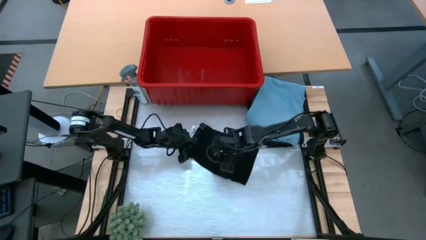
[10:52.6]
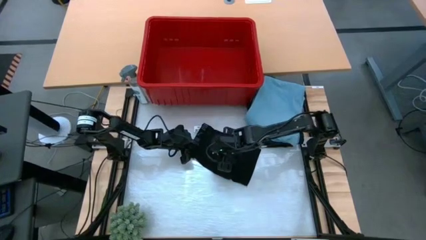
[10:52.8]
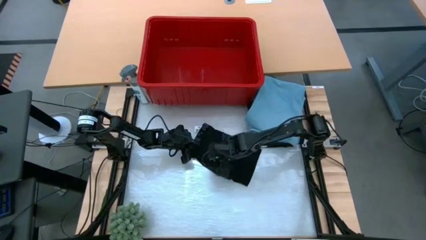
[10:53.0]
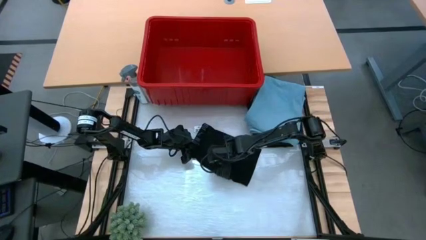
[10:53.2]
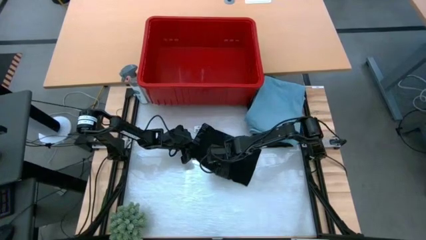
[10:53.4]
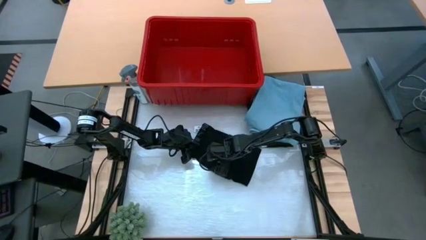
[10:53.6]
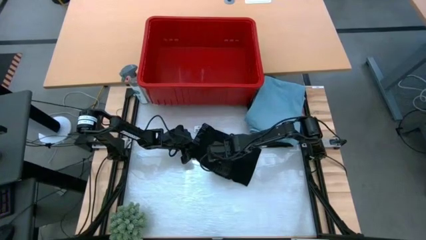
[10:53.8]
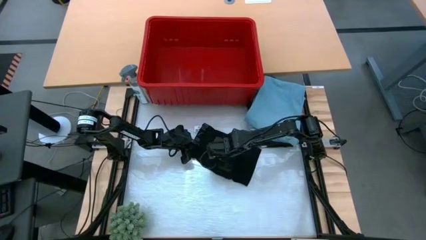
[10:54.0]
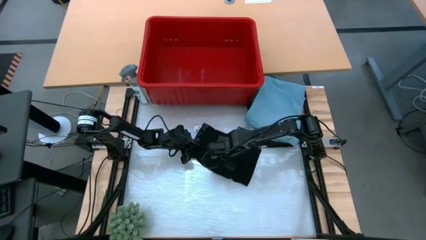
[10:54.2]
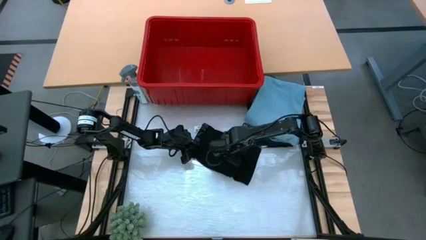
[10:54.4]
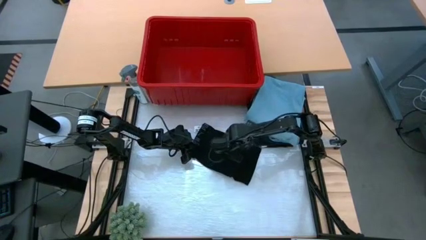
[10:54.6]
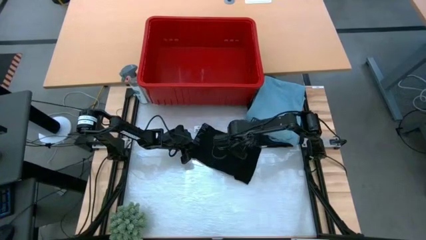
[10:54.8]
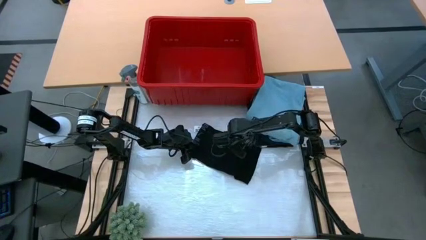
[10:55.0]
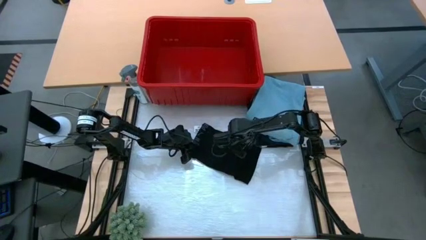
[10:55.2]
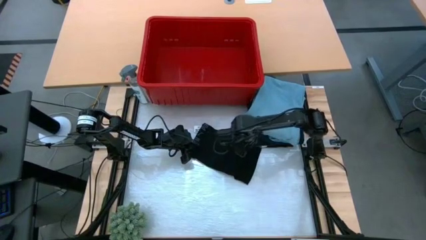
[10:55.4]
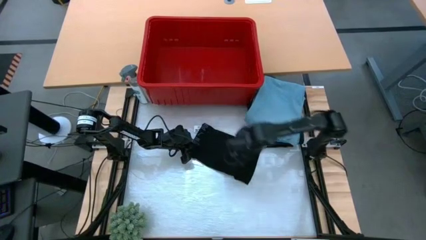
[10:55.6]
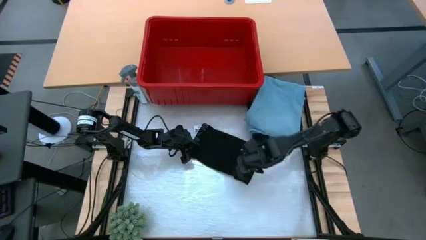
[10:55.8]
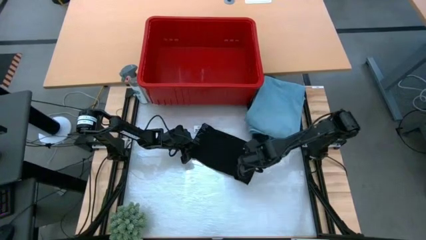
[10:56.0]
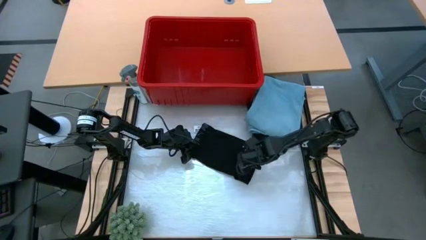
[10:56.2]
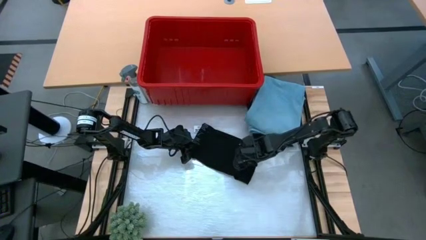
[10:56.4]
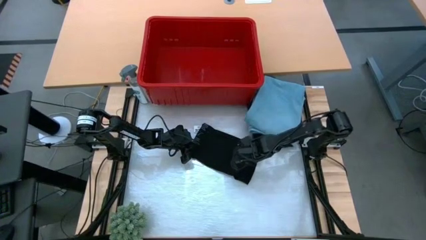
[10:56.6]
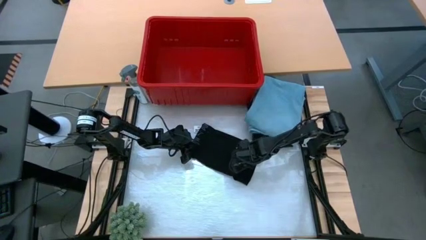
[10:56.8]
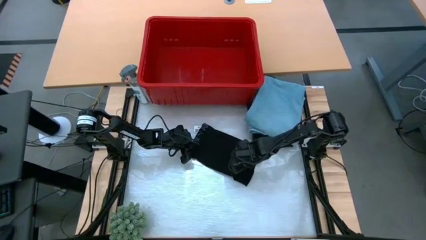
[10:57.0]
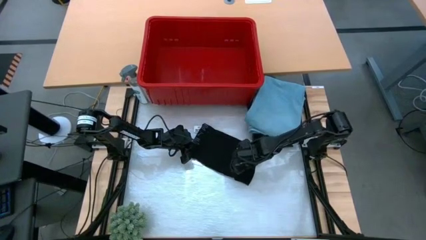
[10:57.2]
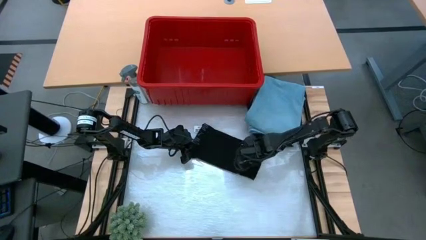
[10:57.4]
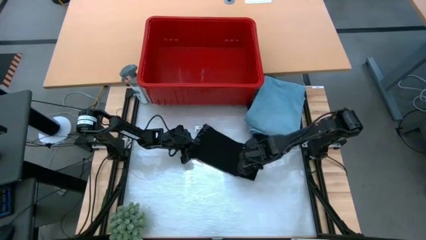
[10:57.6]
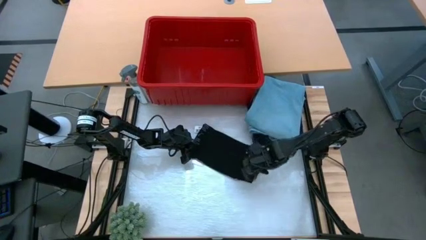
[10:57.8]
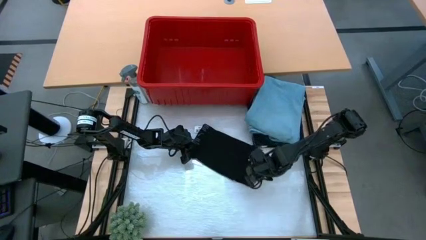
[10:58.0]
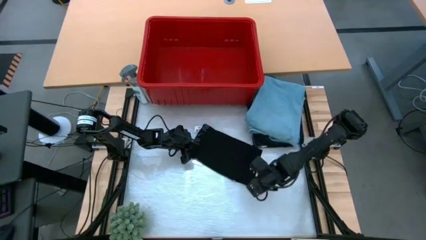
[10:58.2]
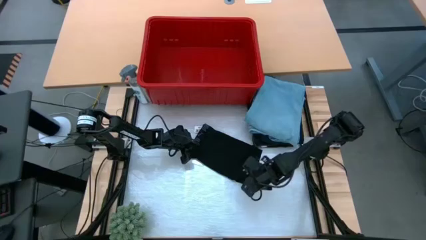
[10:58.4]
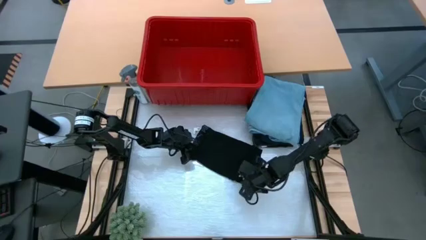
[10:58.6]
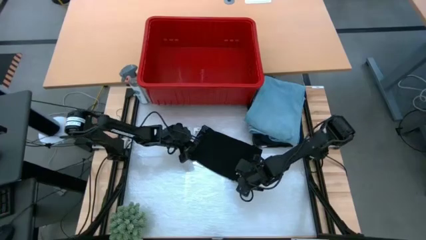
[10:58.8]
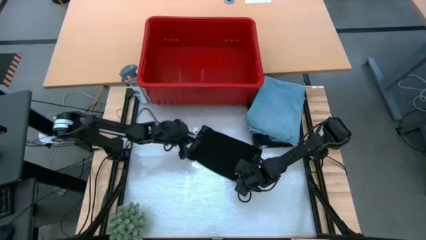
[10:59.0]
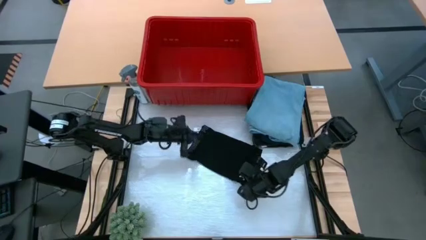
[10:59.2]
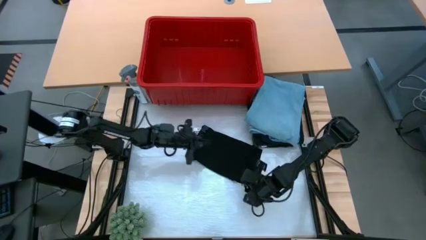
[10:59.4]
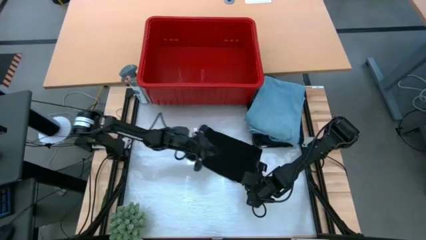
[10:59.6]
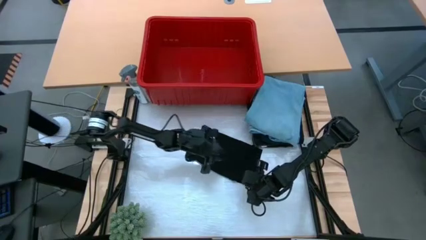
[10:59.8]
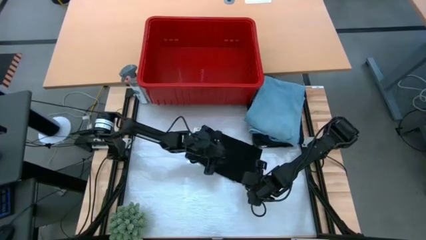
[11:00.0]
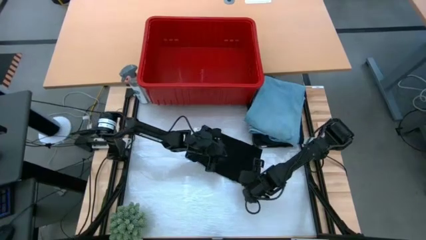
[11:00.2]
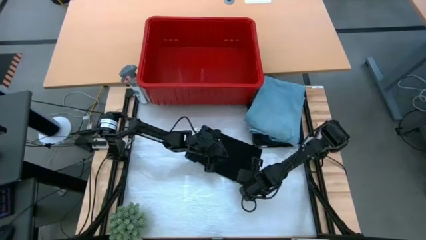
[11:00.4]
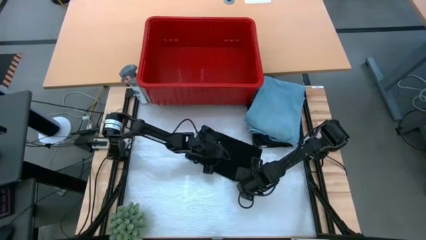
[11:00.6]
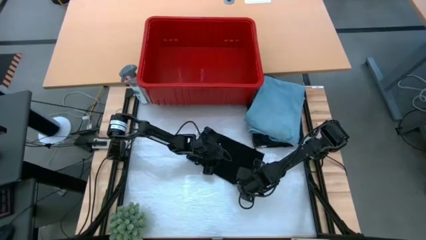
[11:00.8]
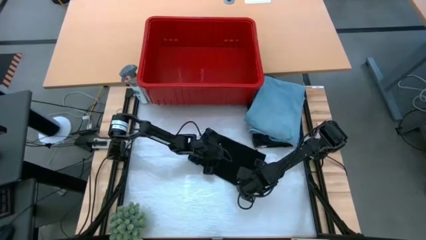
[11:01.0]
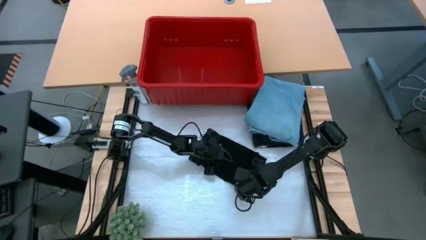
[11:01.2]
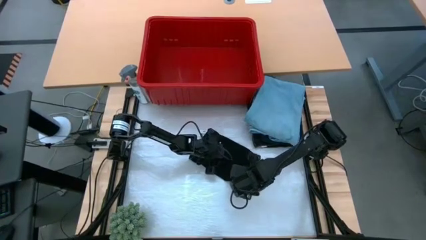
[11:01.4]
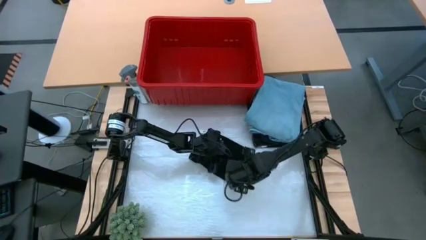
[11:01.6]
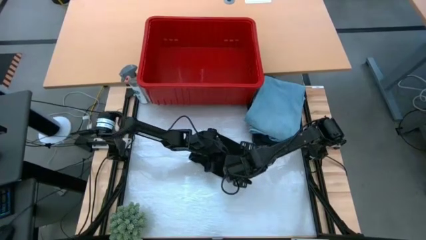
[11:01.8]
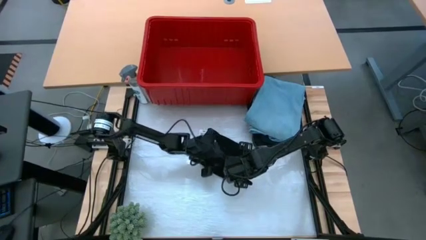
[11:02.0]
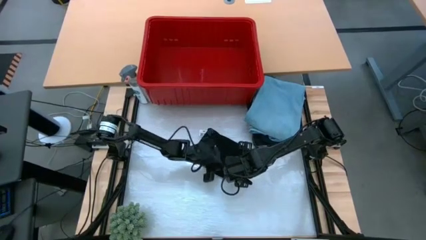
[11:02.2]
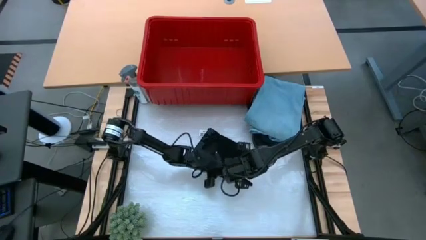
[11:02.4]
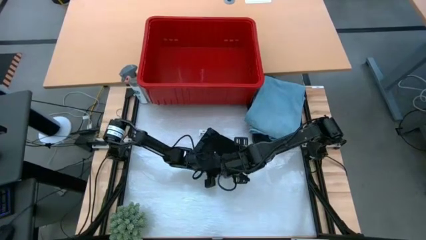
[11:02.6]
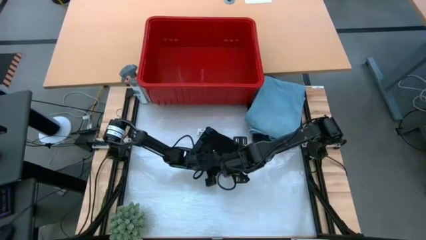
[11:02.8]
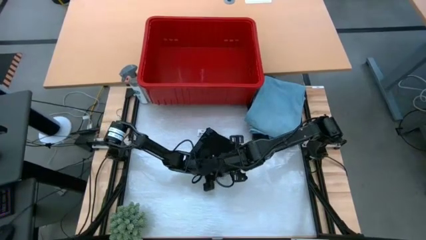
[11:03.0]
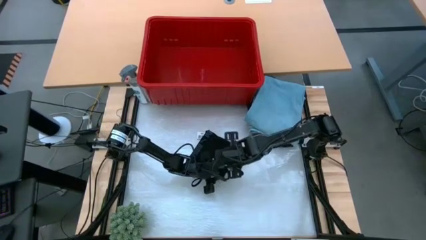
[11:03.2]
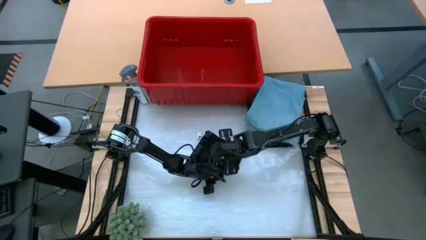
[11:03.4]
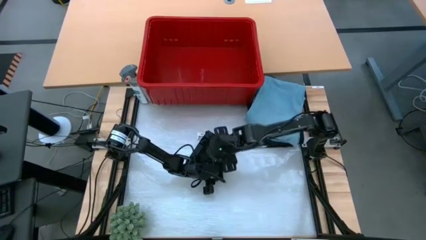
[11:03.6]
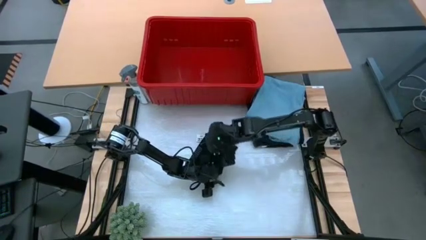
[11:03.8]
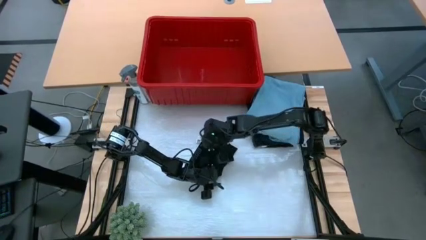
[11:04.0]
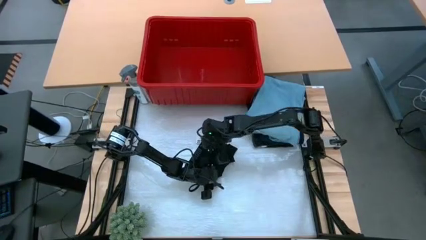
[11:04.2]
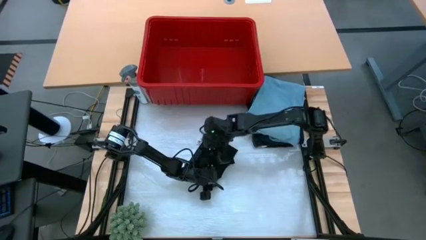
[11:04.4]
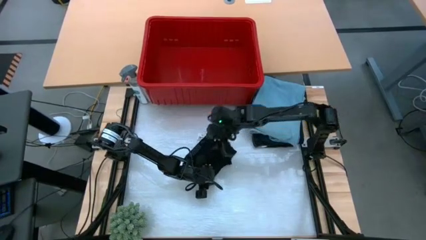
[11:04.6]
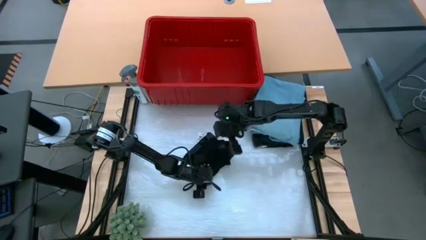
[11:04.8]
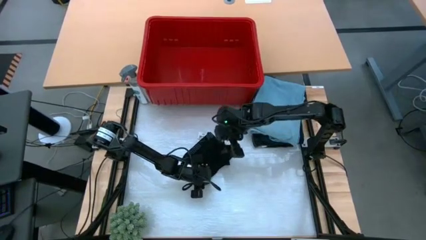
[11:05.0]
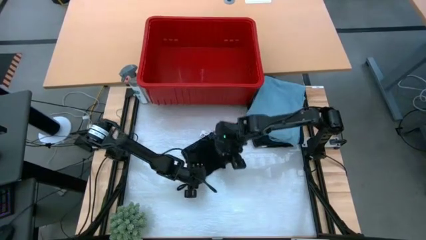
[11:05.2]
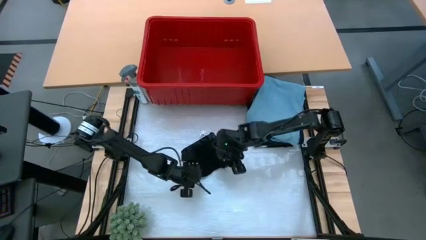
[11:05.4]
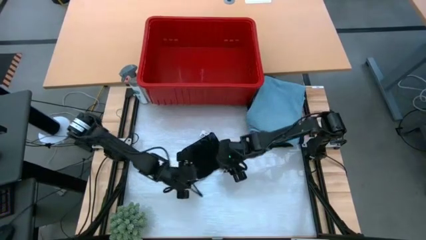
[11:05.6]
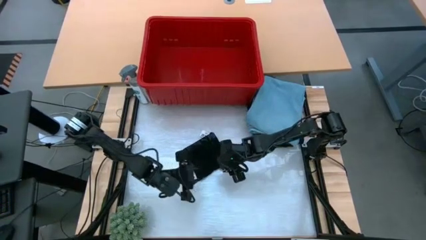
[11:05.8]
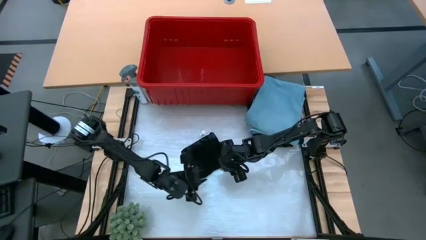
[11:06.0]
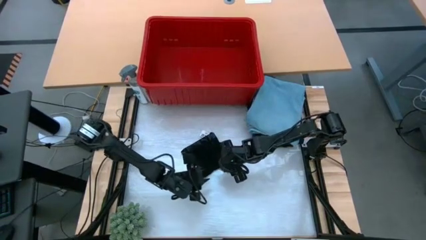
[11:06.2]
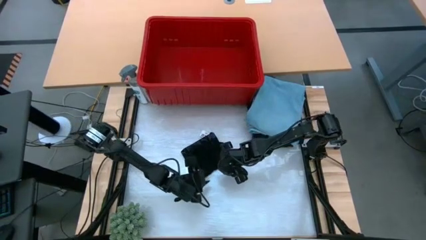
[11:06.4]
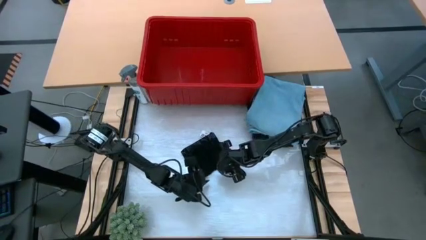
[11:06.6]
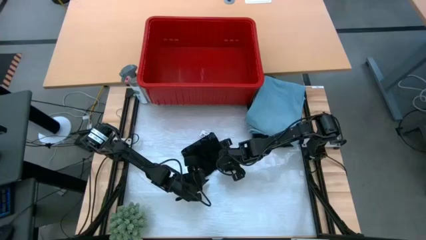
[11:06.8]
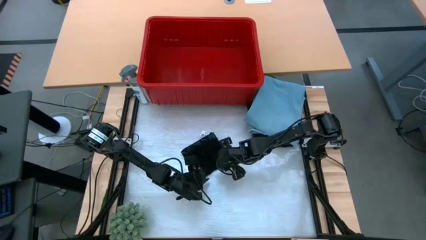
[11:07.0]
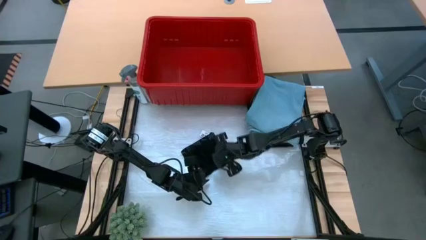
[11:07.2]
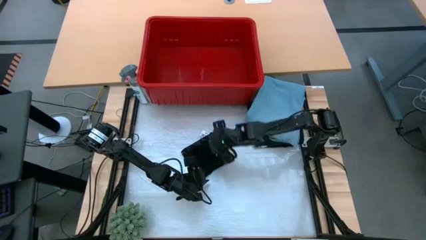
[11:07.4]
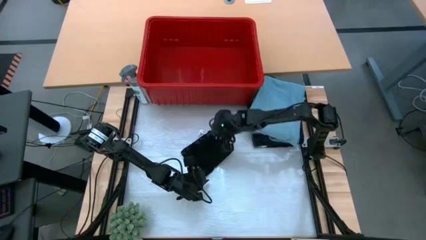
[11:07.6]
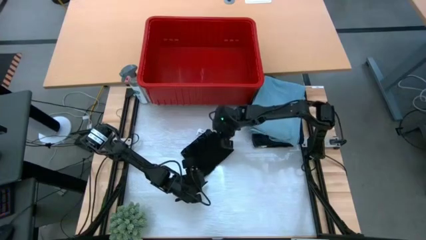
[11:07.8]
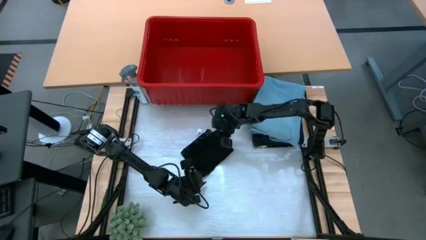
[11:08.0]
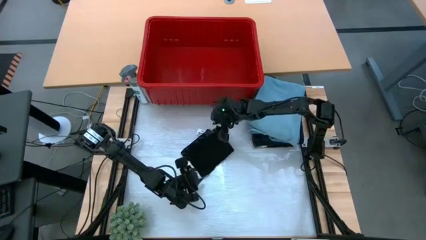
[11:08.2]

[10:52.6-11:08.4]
Task: Fold Laundry from Bin
Fold the black boxer short
